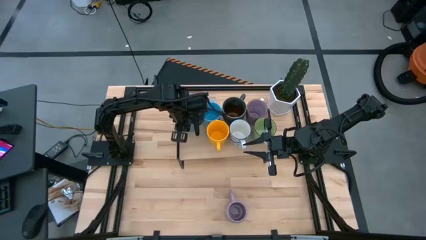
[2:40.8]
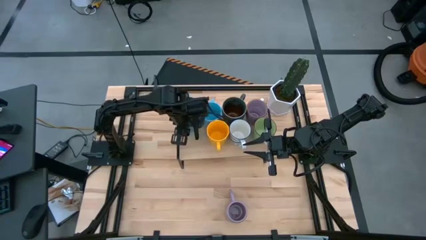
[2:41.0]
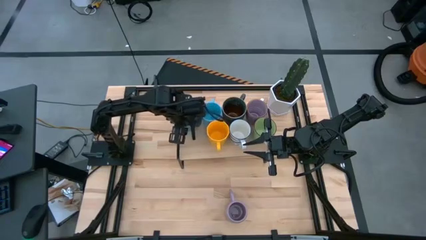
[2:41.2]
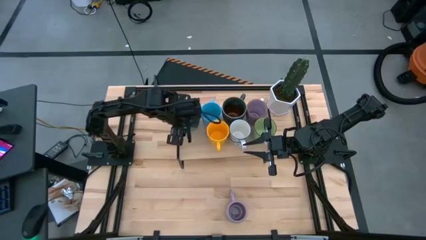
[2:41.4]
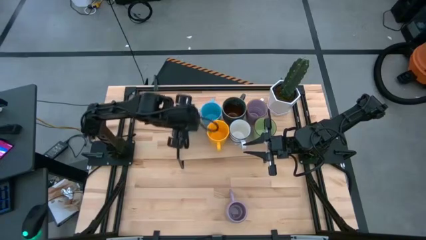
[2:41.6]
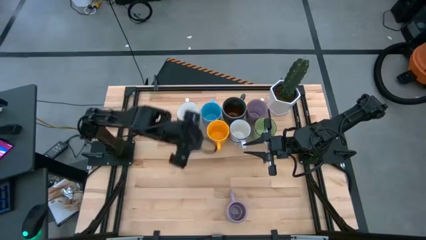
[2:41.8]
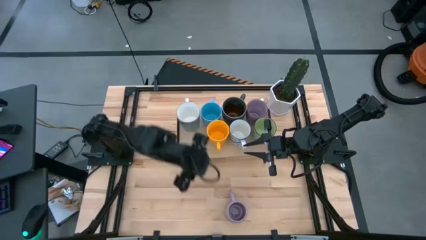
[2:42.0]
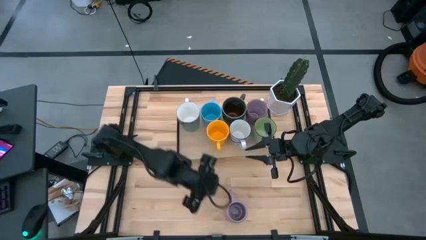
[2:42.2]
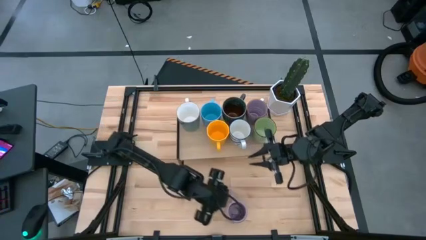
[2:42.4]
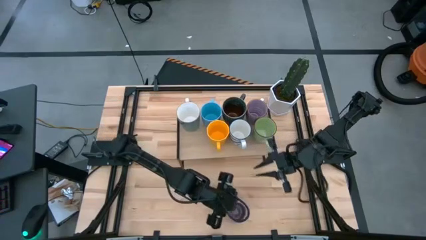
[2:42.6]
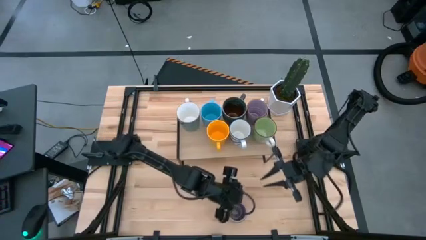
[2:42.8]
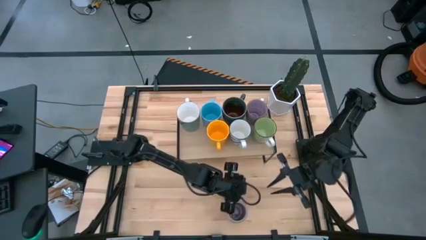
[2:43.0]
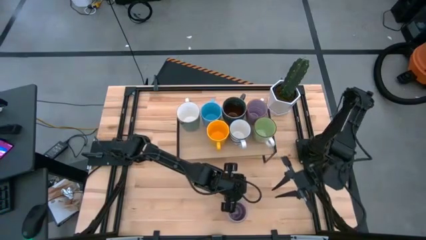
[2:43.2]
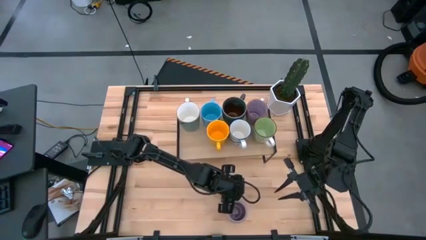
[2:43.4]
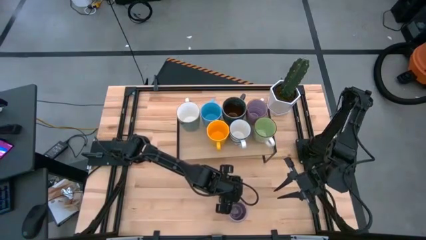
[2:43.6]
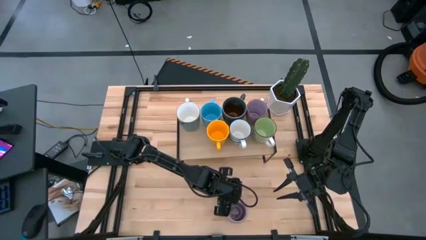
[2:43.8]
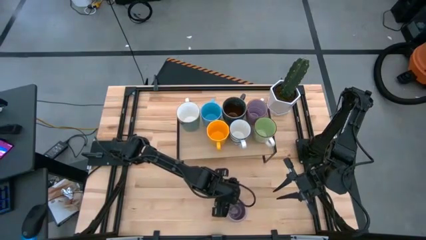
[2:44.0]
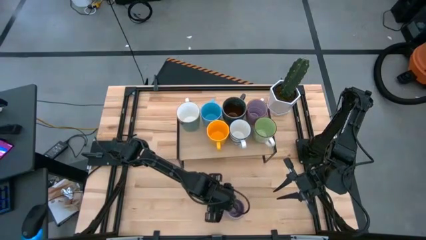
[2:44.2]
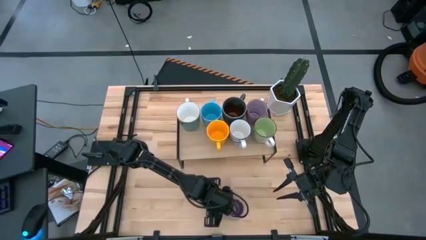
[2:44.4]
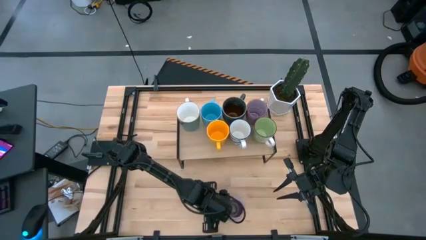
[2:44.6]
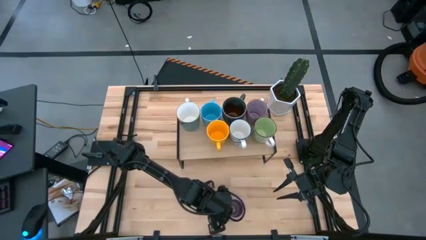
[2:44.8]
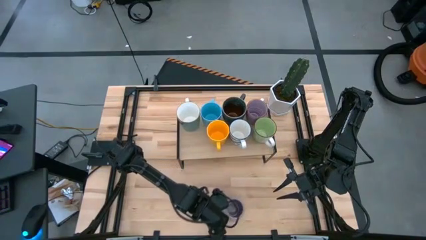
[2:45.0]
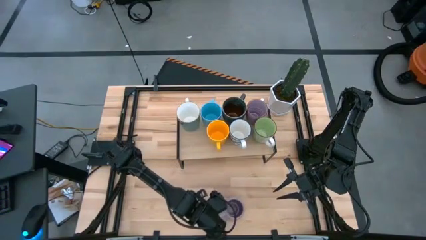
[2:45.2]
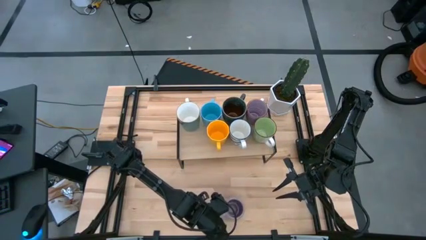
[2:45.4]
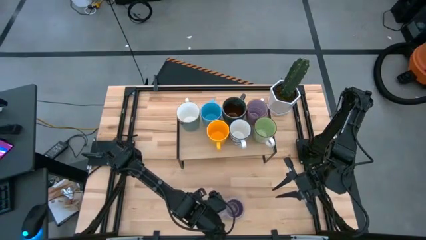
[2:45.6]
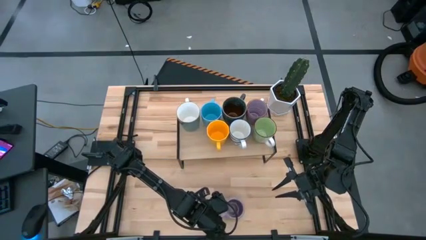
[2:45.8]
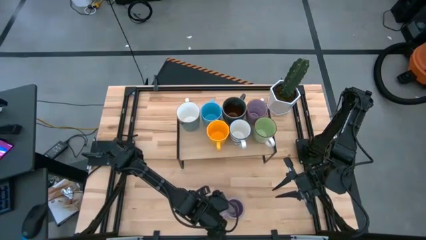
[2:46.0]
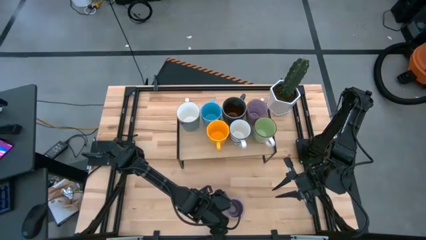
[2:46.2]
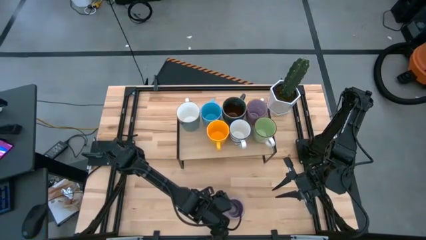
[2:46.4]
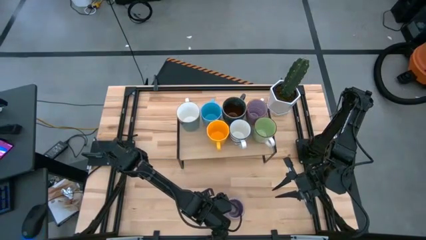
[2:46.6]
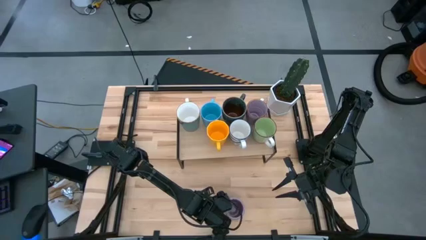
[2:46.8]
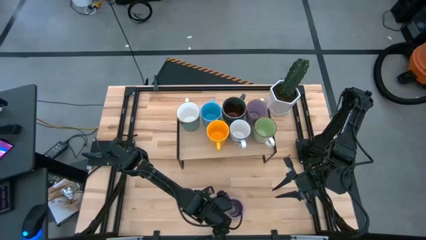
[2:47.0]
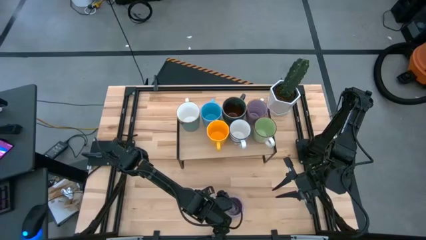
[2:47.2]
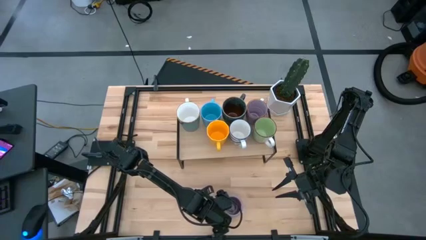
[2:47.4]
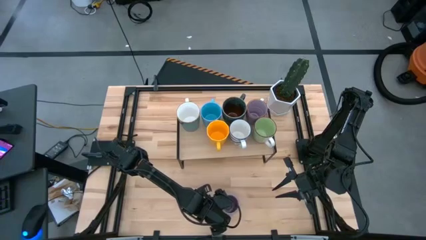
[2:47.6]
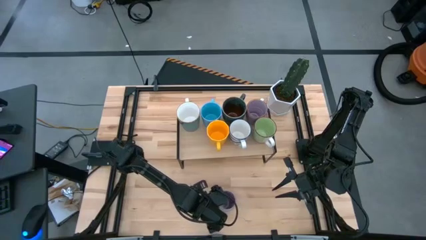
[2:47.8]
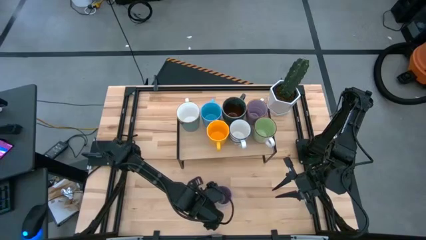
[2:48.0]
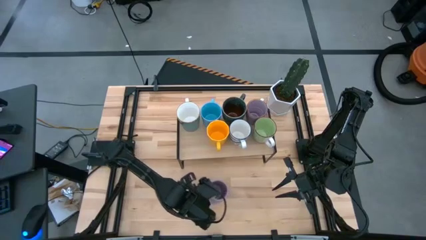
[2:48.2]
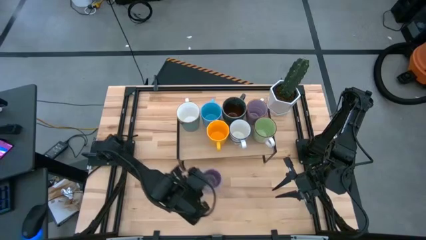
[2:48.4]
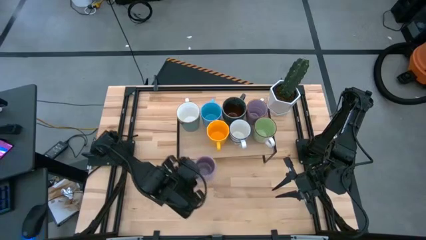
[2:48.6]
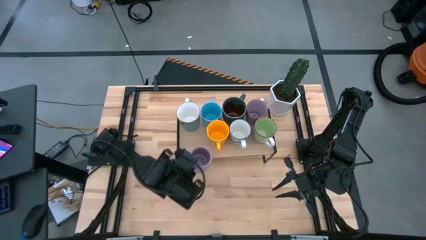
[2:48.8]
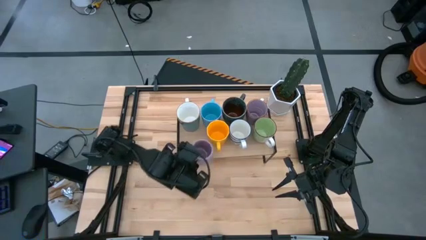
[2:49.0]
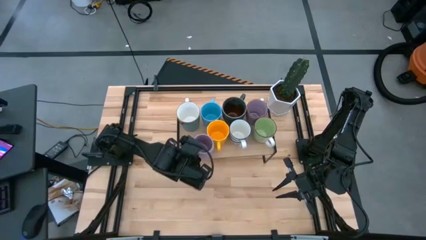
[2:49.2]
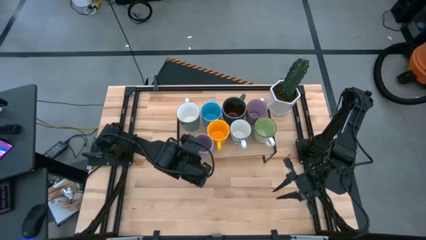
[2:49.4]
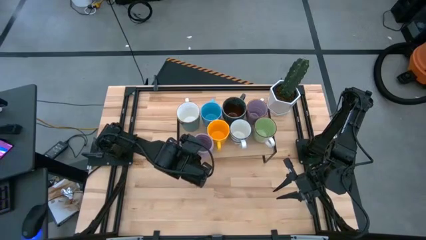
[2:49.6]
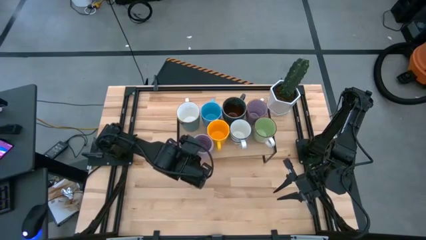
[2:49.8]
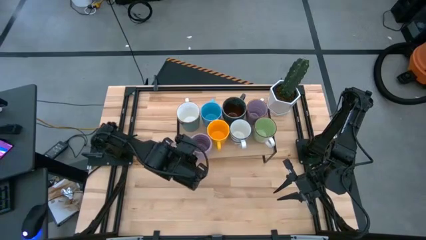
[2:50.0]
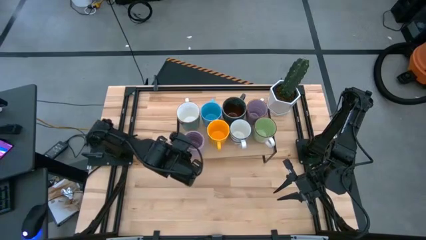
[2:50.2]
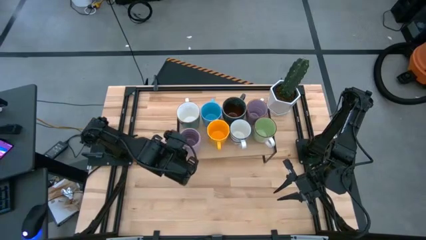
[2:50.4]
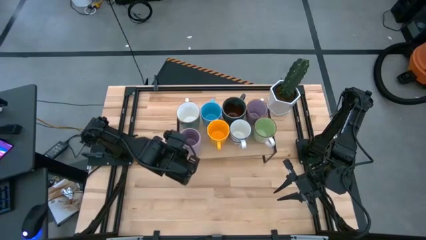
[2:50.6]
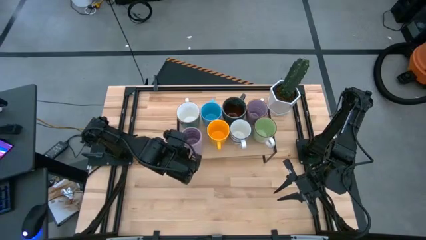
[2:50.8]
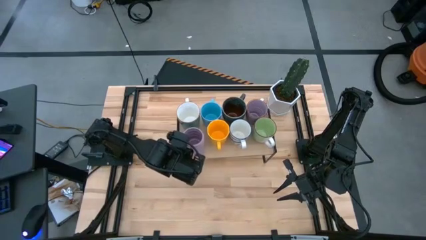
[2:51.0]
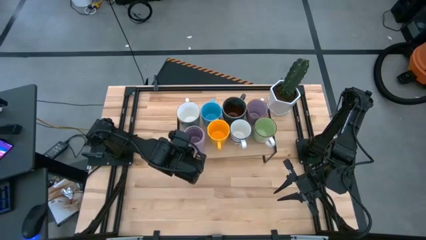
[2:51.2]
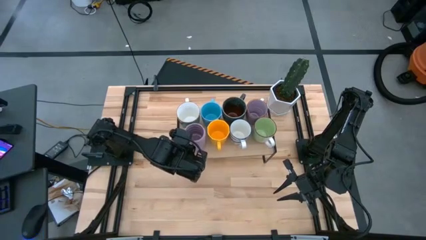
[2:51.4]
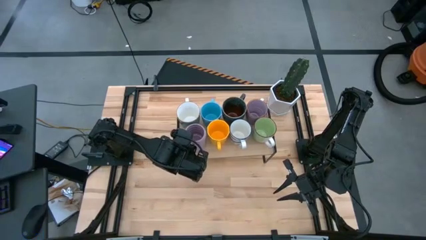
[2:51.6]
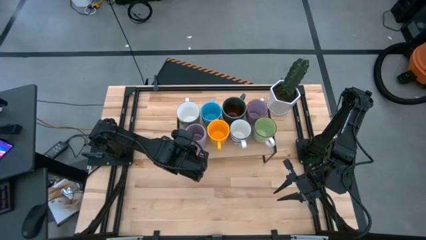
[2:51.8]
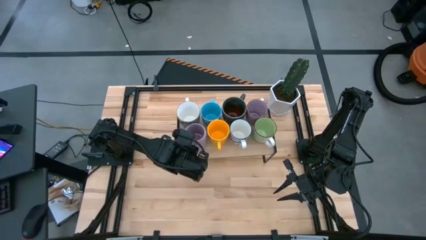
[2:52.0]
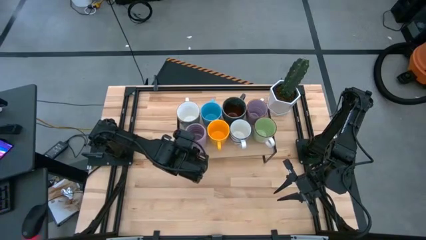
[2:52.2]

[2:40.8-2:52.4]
Task: Place coffee mugs
Put the violet mug on the shelf

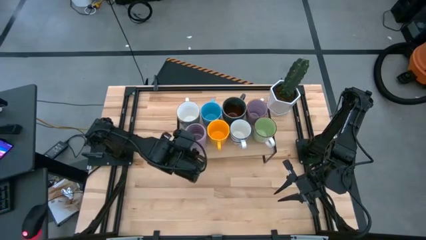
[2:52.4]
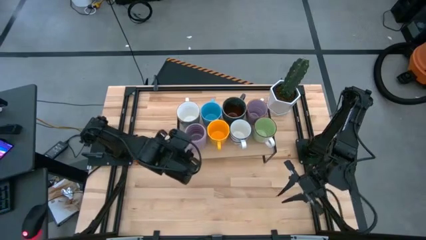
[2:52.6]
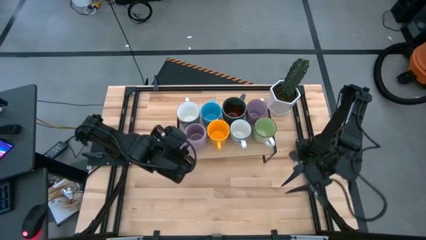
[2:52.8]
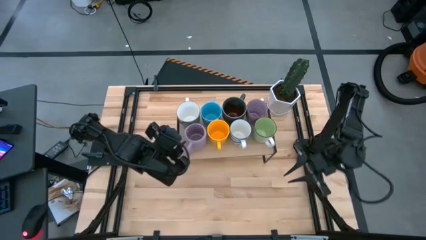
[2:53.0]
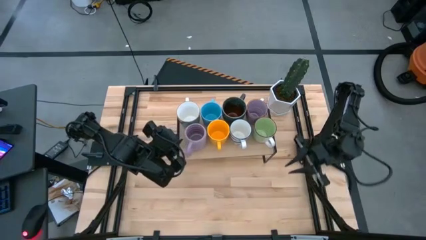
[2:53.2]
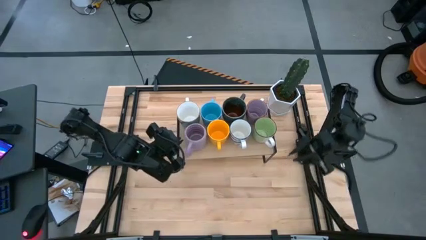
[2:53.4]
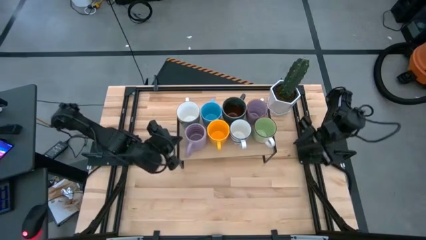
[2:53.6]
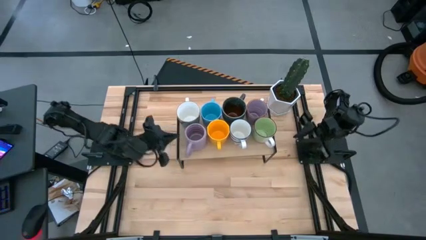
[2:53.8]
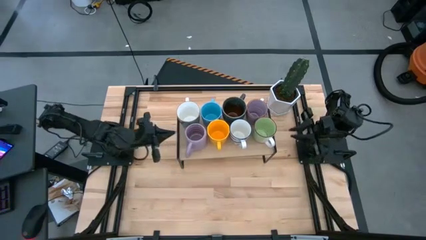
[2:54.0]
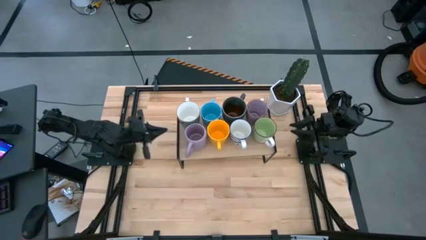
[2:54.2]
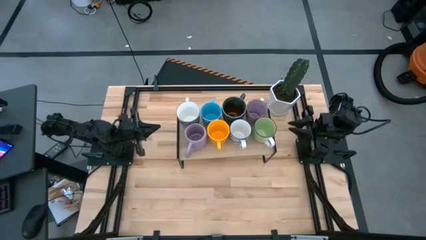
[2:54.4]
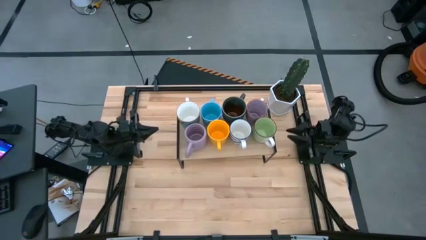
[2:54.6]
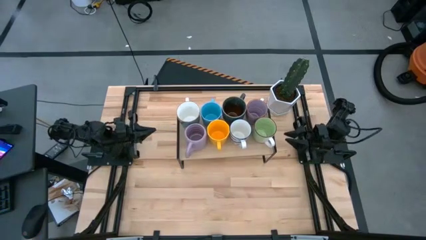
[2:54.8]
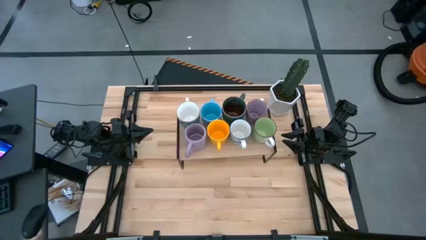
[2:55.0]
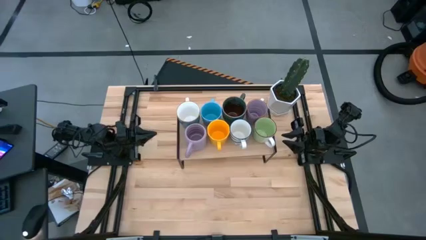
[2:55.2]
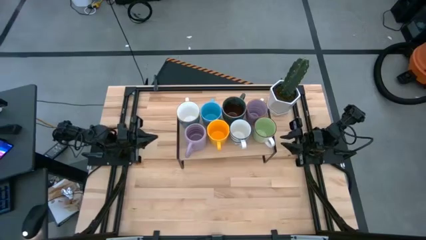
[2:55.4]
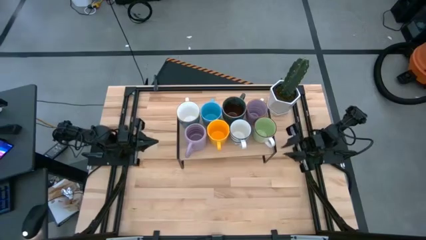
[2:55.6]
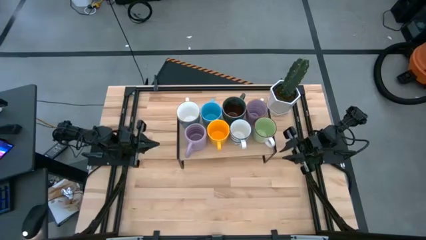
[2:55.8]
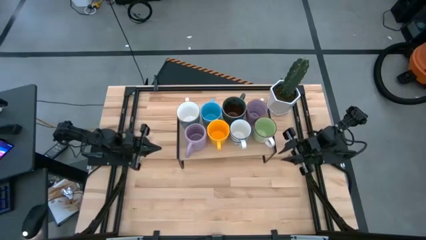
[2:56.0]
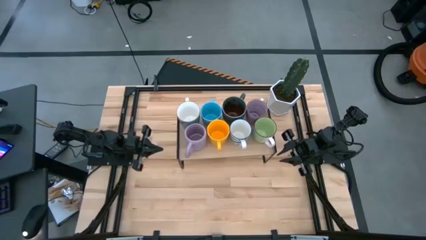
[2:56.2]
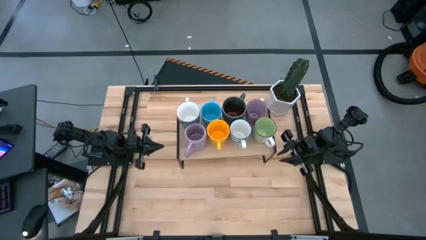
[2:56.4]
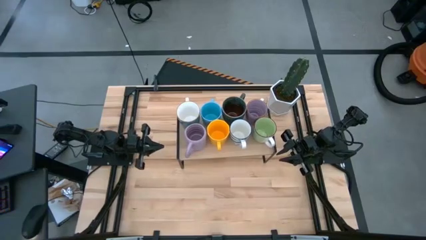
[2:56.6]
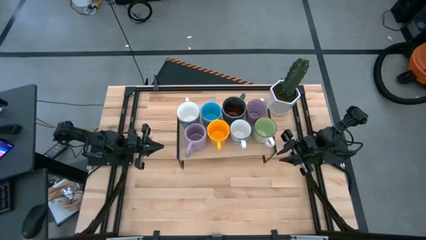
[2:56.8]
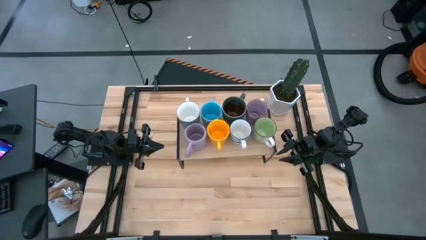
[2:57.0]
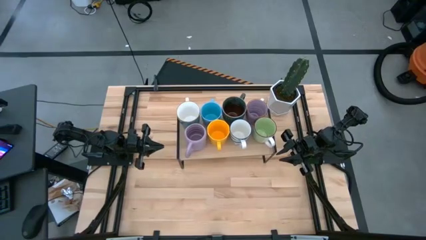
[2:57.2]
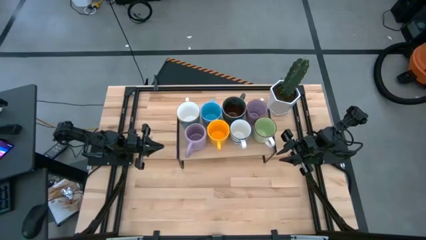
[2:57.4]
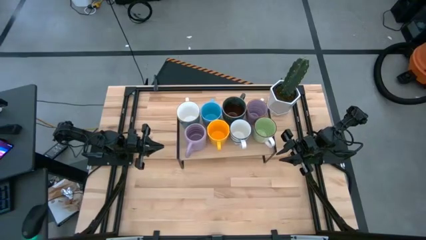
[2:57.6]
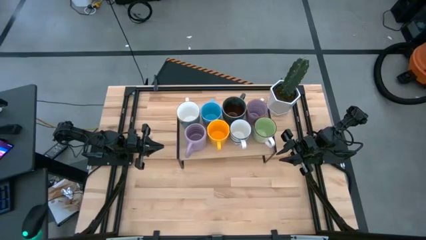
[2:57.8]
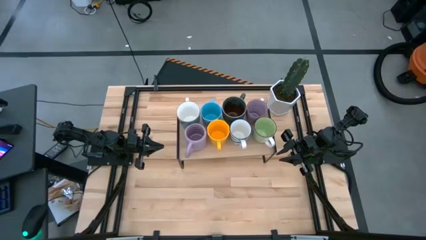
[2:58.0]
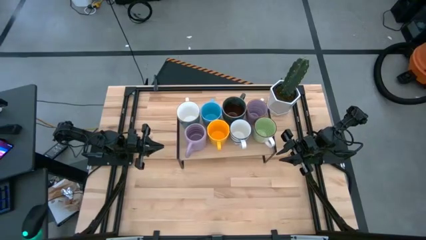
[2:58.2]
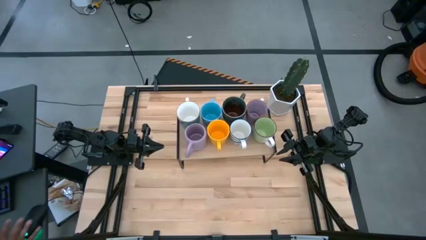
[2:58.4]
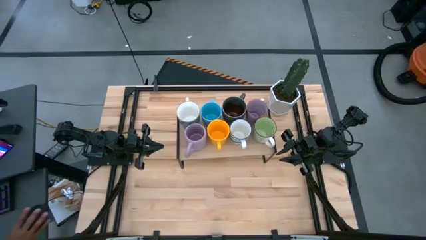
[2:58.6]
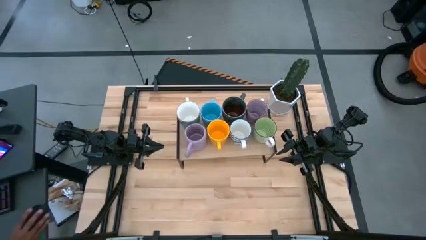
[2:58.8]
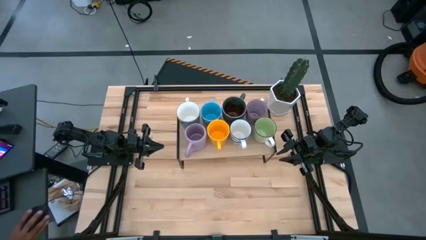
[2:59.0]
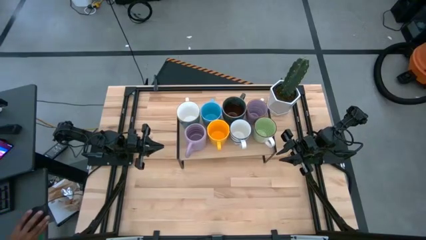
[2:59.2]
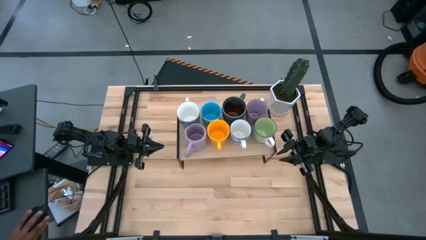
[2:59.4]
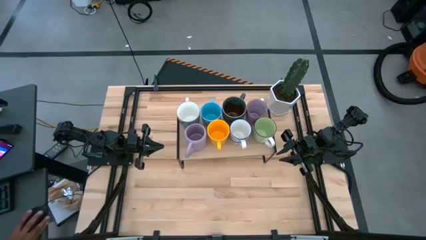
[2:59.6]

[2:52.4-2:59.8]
Return to Home Position
